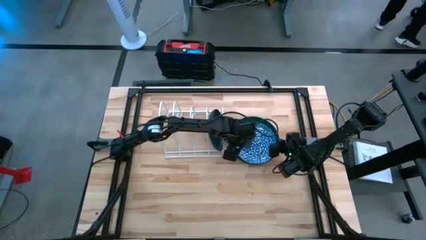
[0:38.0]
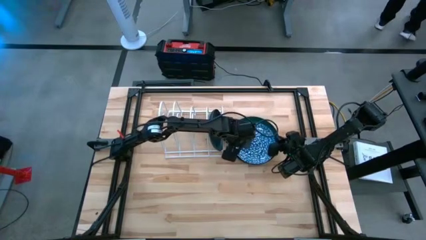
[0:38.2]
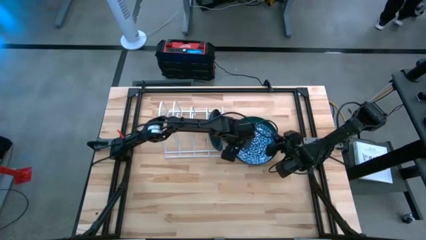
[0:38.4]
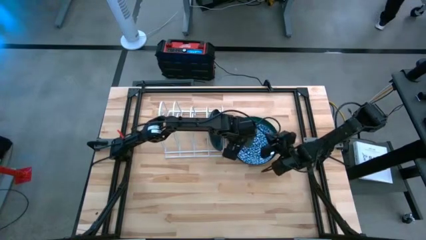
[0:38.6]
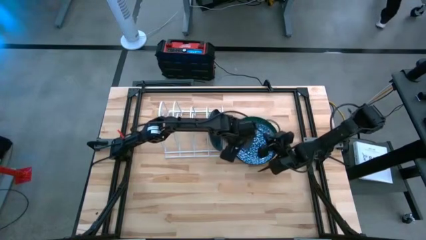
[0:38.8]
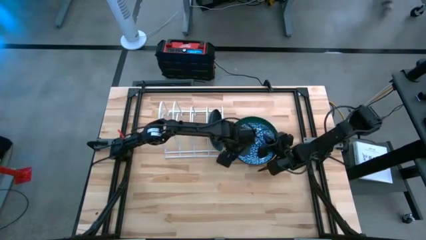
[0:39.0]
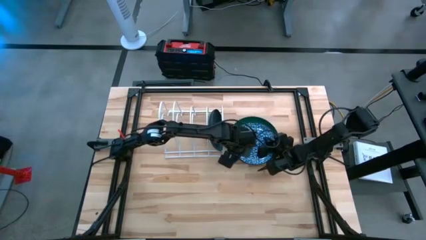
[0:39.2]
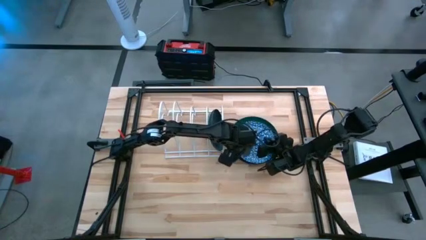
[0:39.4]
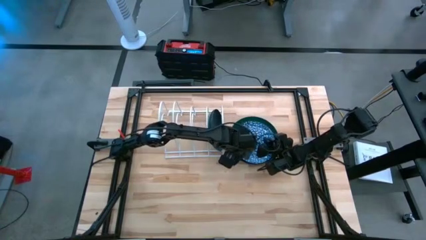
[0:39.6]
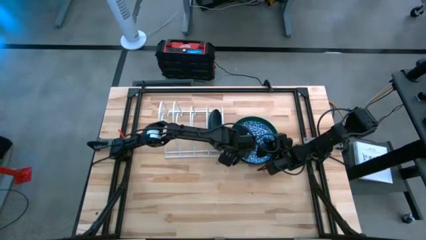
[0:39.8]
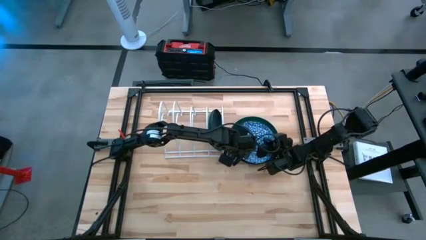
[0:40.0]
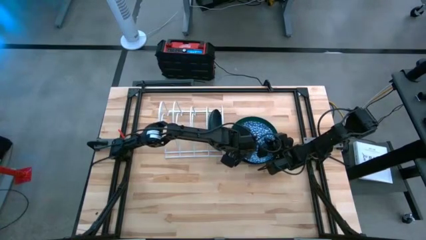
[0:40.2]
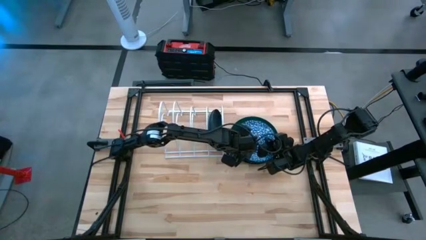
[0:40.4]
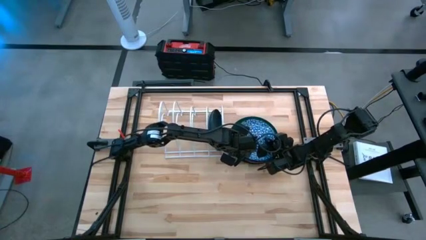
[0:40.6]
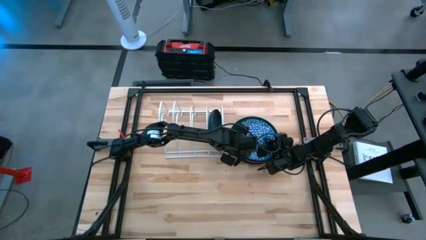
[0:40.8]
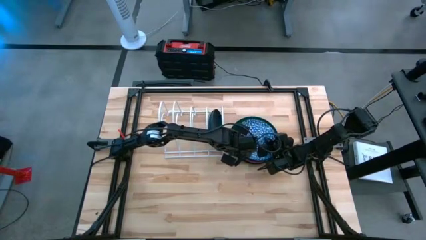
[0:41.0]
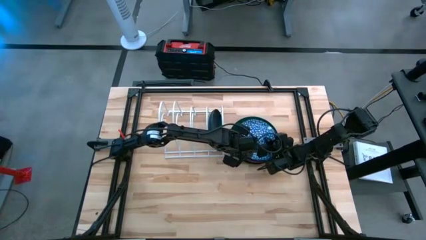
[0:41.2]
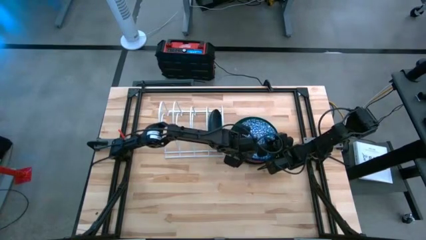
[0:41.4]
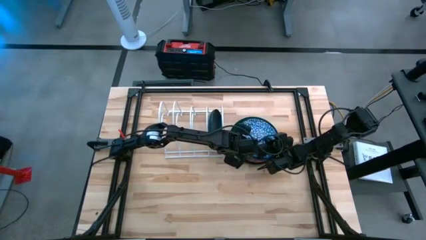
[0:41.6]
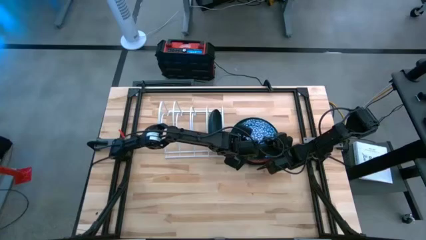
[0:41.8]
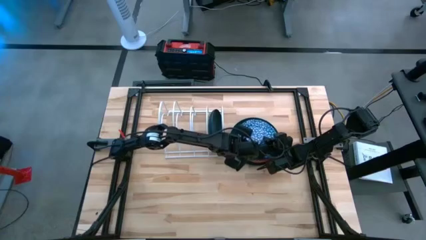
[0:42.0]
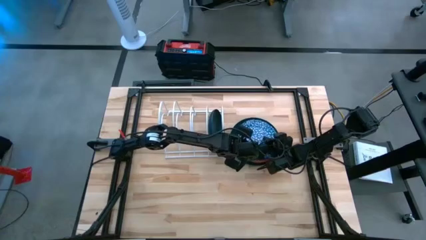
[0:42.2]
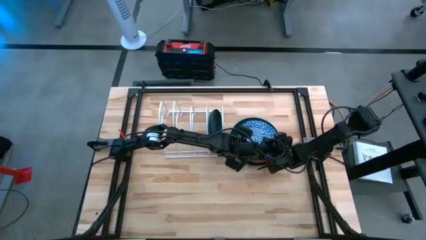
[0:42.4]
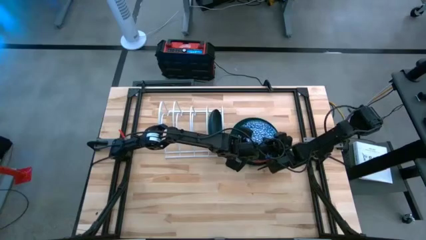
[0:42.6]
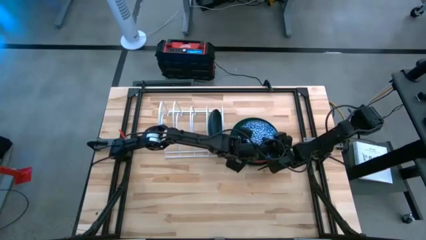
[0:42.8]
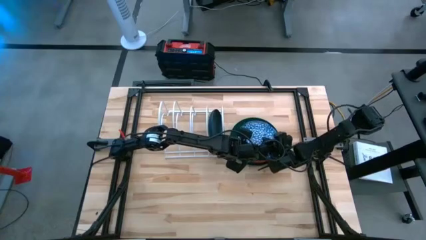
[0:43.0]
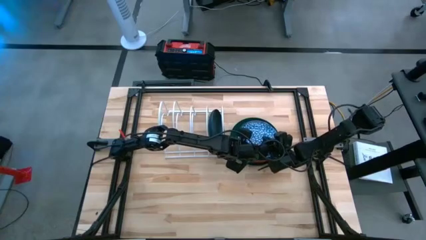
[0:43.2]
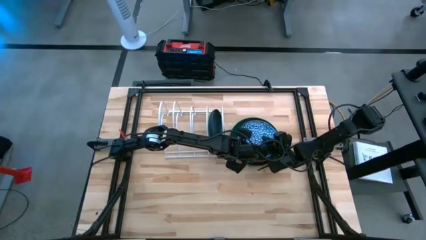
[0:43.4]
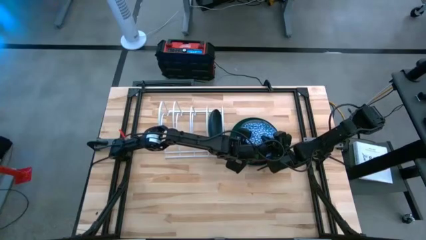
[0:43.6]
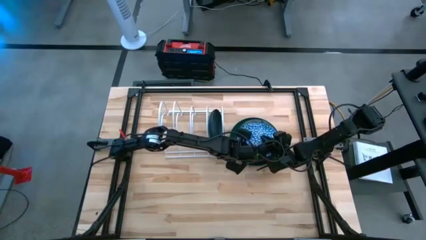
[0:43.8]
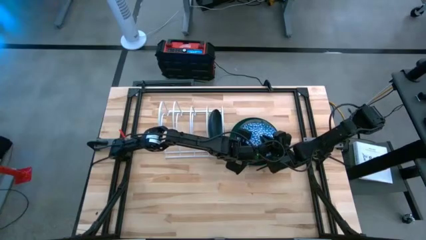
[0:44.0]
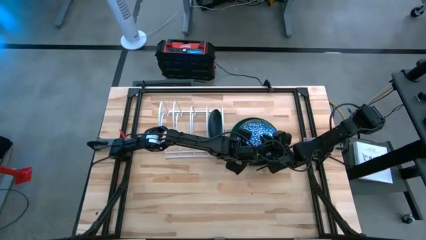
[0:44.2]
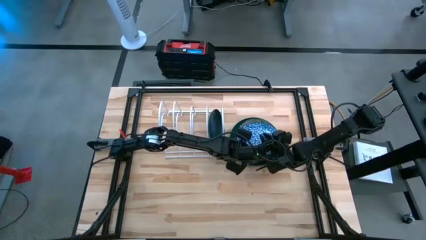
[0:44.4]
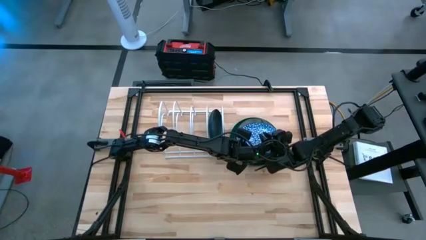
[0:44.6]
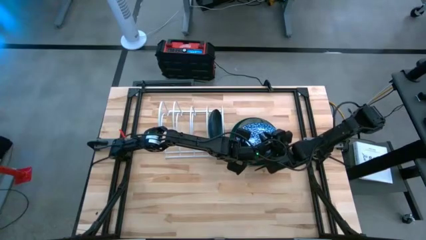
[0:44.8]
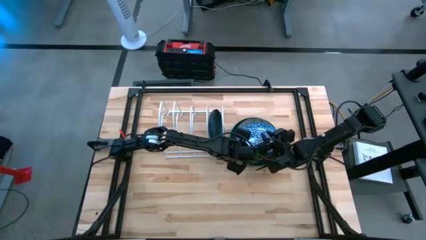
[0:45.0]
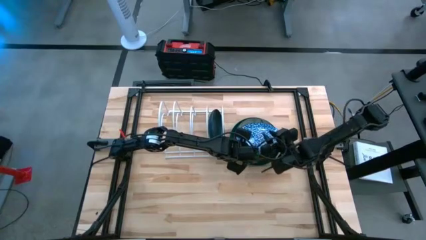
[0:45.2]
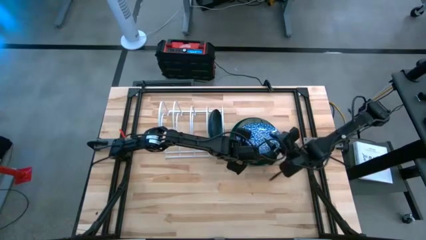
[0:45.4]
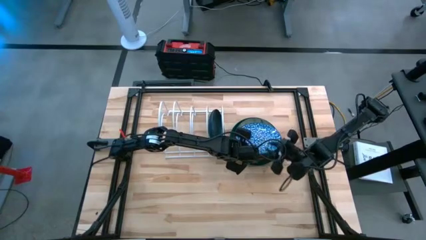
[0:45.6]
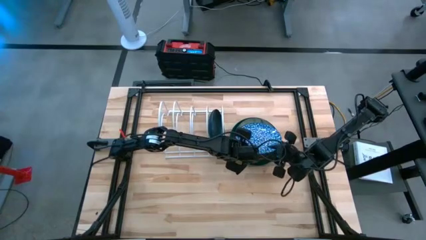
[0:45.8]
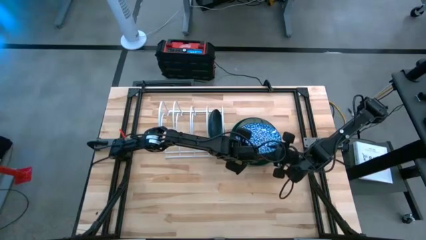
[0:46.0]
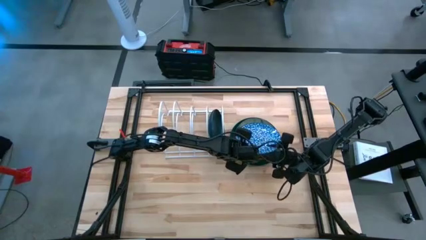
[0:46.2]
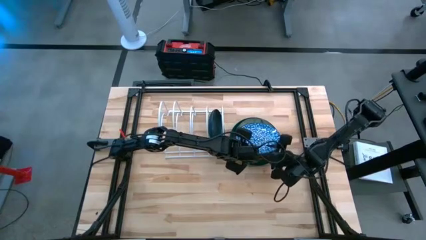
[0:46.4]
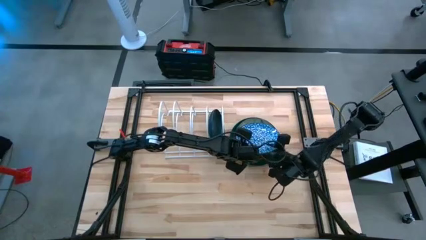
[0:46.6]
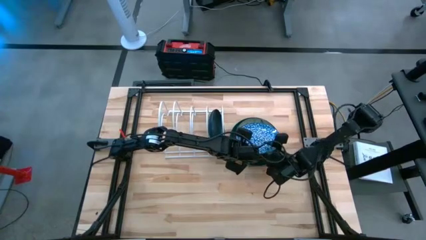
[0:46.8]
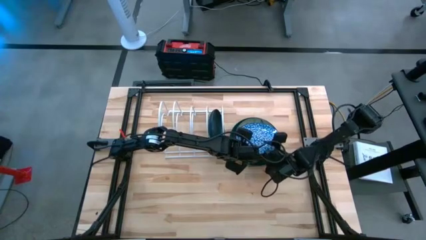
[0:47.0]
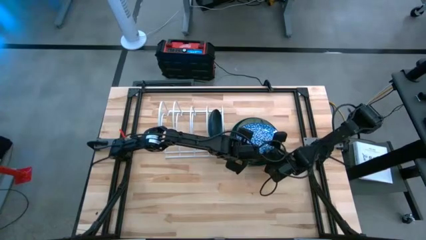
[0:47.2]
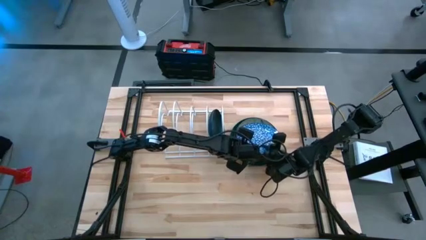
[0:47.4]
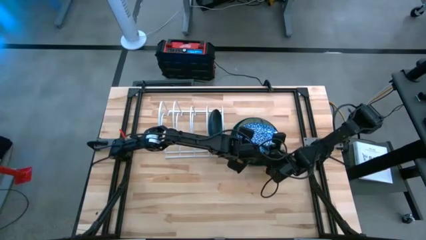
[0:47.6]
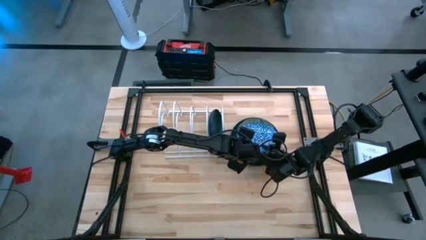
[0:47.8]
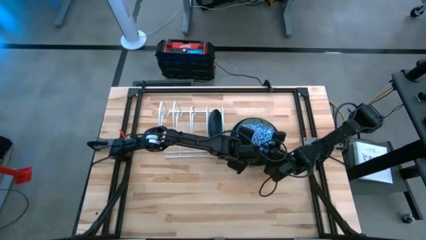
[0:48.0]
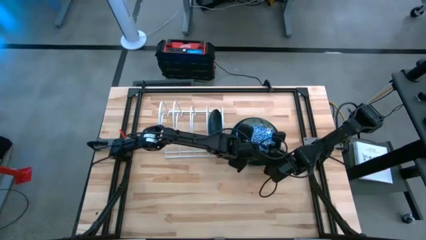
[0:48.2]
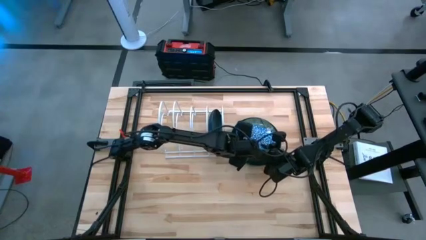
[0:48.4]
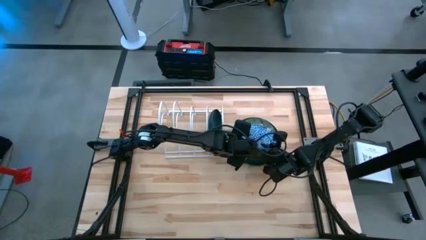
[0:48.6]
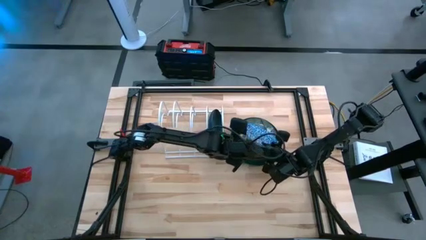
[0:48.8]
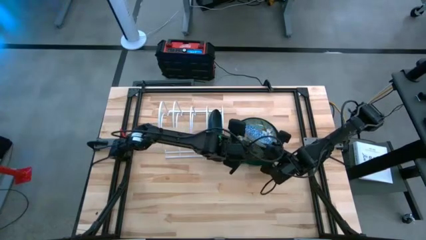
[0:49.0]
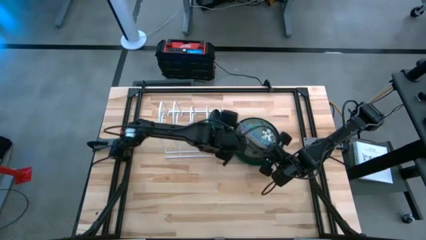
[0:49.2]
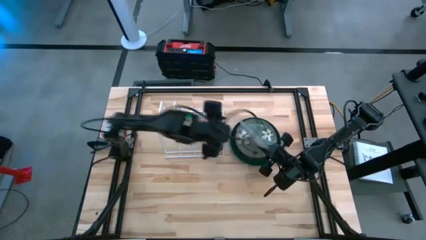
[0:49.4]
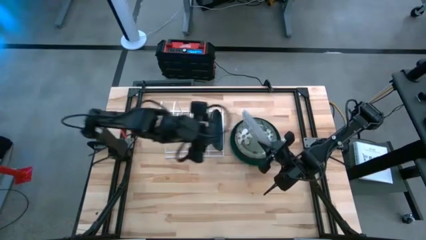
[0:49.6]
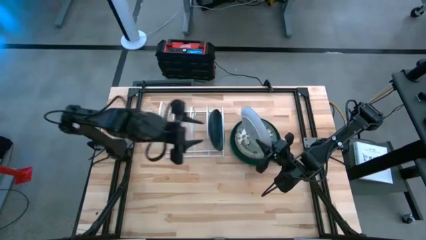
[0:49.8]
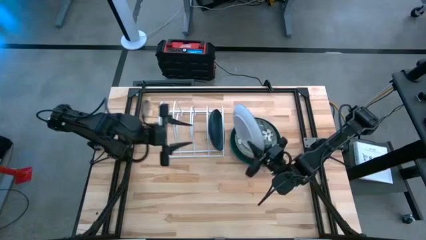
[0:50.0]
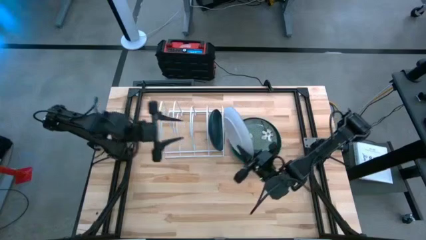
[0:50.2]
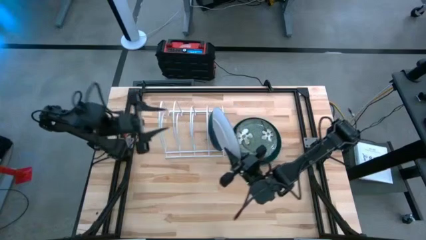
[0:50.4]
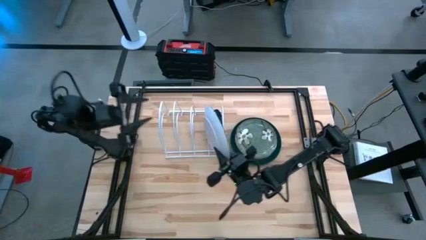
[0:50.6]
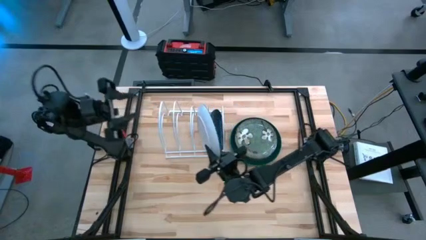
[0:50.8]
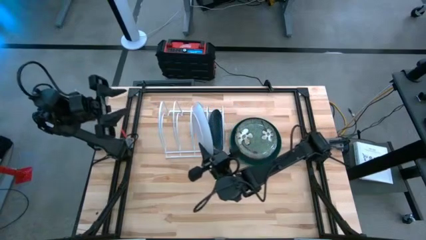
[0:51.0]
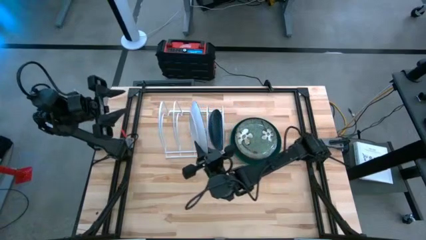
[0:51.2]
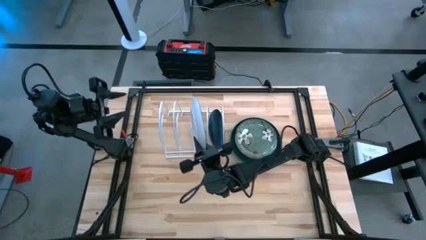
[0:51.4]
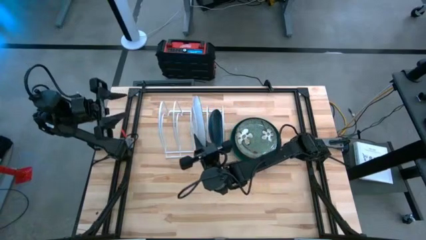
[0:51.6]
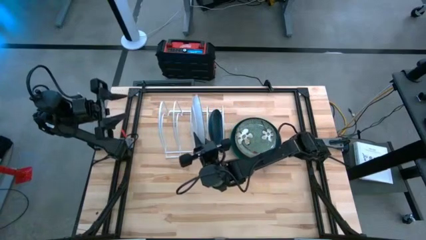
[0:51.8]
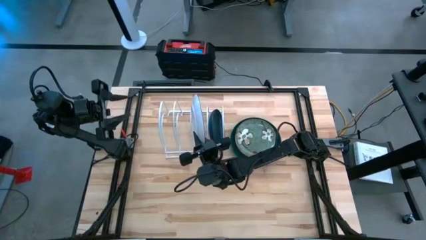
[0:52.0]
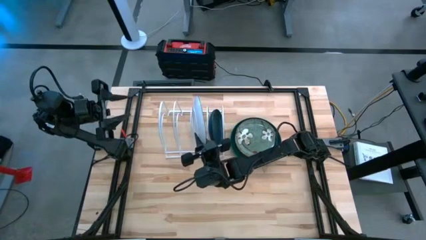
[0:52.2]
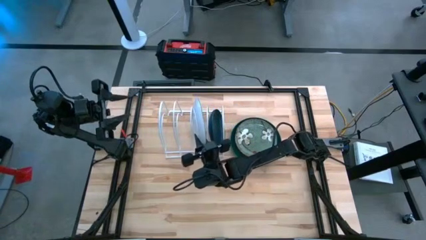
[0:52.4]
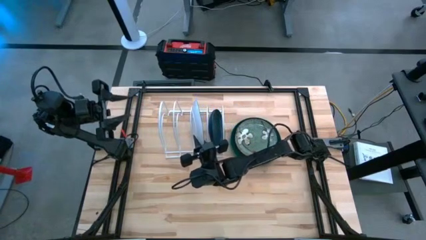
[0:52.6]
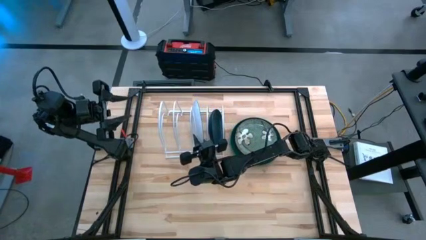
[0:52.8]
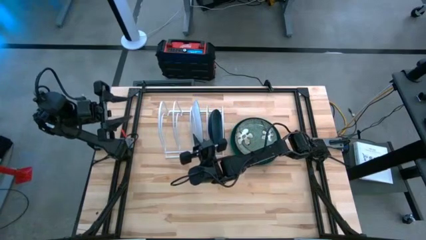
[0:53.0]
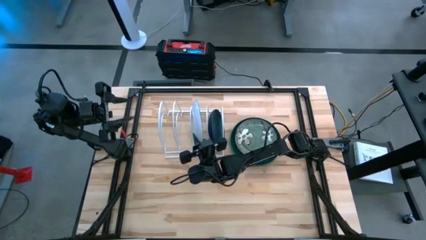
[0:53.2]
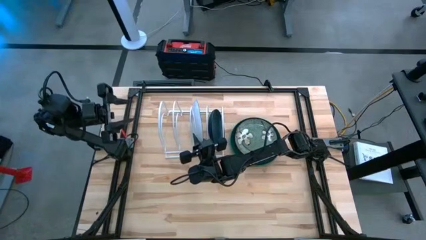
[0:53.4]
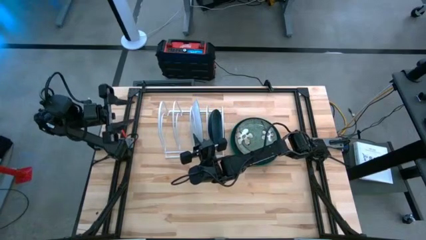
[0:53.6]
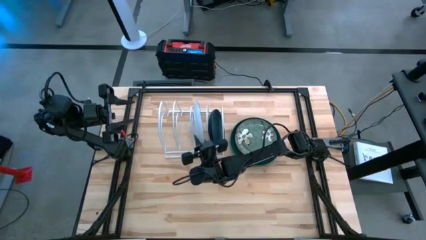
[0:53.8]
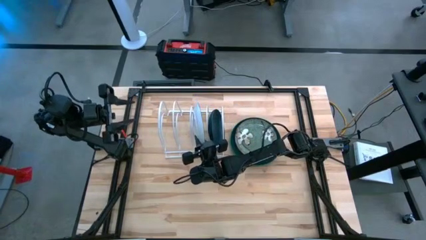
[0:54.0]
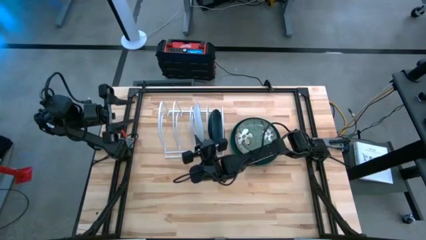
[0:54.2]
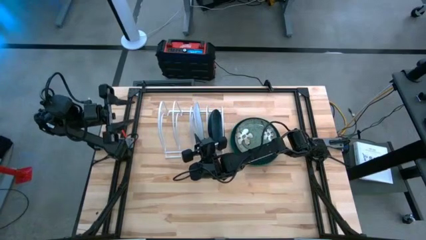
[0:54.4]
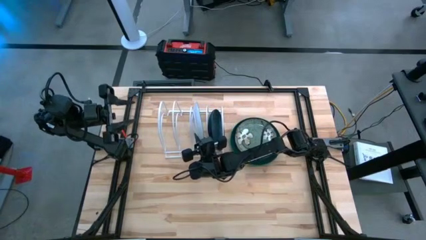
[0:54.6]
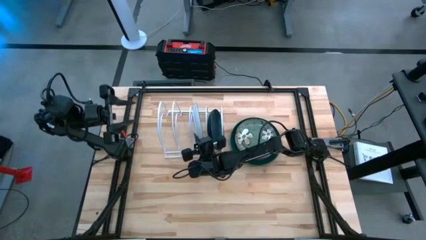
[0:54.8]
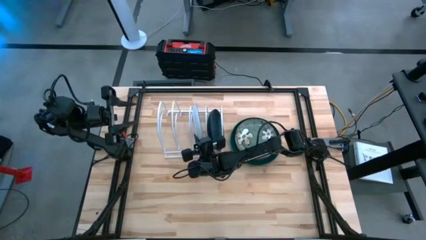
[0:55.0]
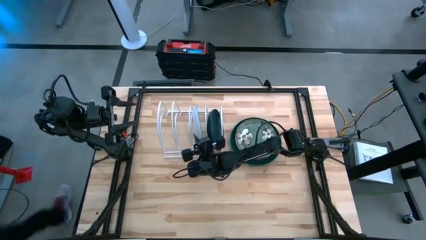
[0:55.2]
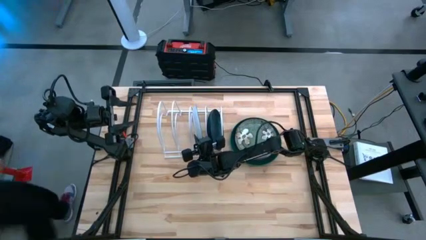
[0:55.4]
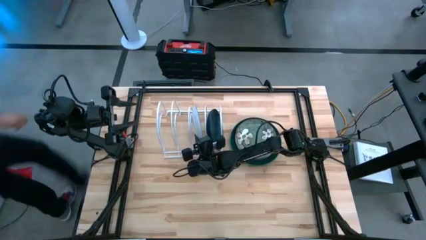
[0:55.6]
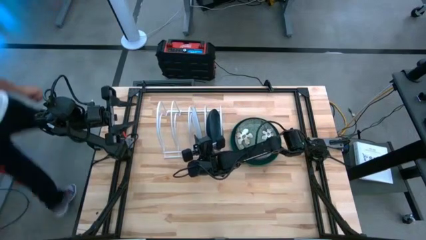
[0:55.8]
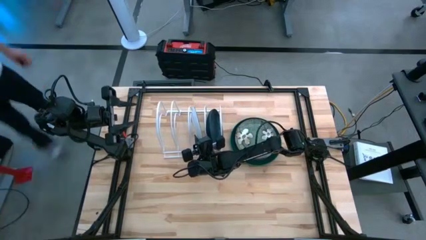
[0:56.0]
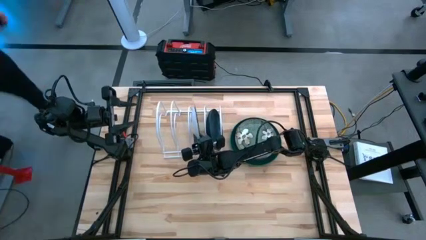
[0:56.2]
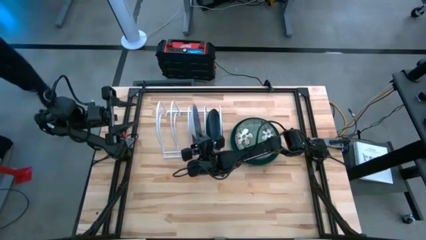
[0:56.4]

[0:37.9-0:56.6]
Task: Sort dishes
Put the blue patterned plate into the dish rack
